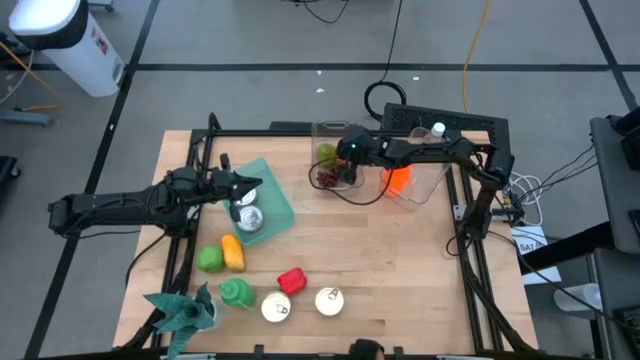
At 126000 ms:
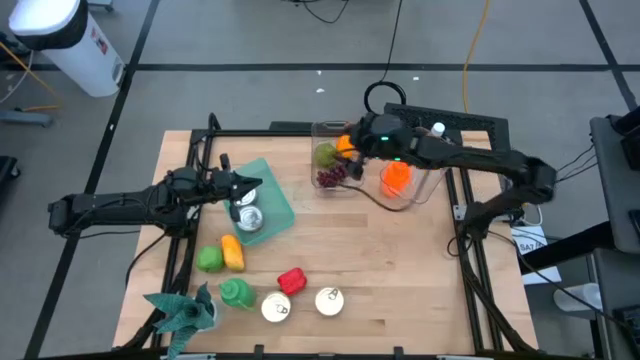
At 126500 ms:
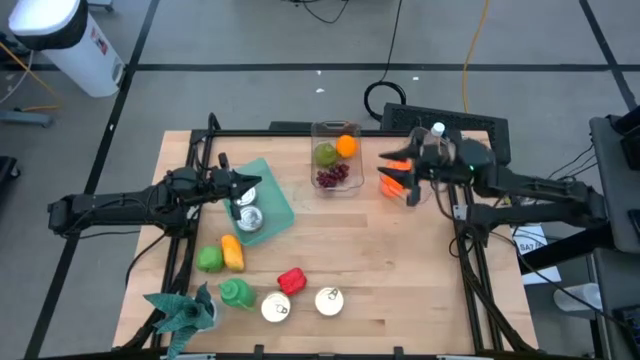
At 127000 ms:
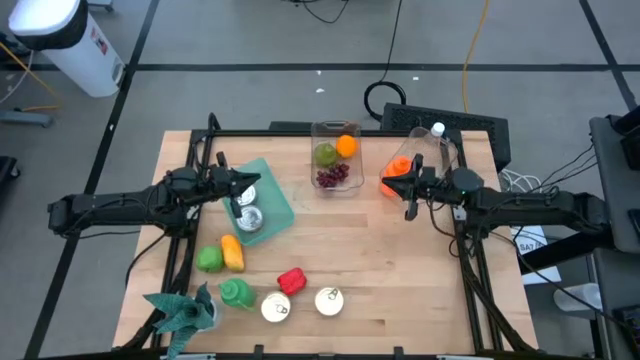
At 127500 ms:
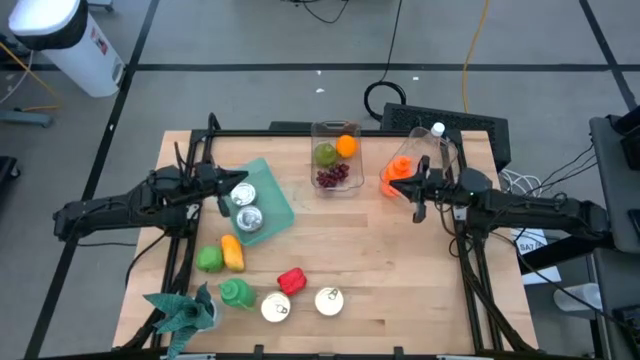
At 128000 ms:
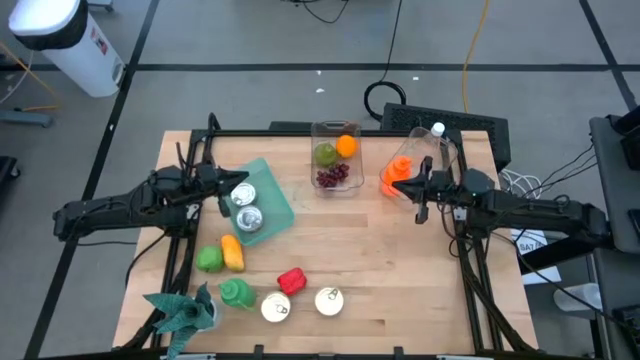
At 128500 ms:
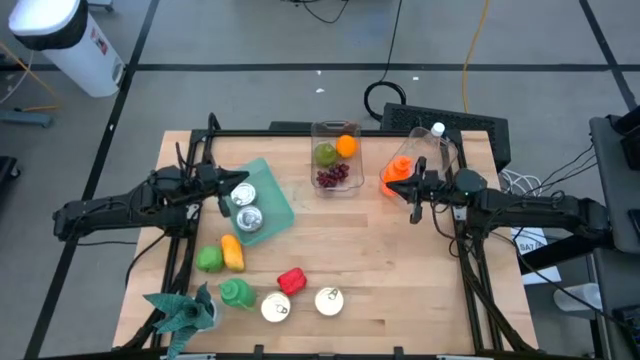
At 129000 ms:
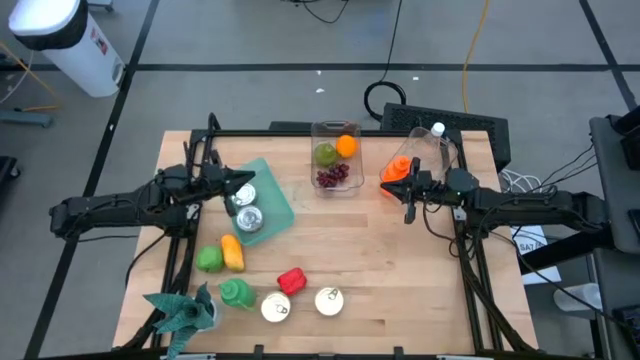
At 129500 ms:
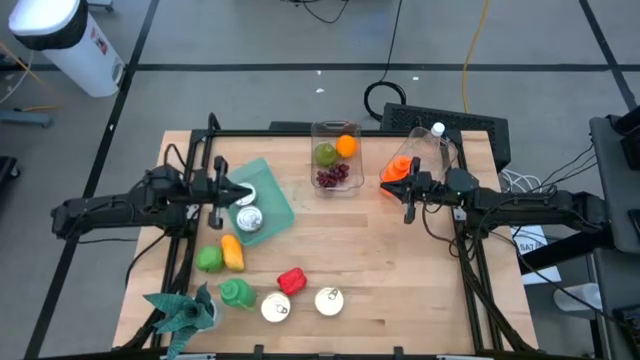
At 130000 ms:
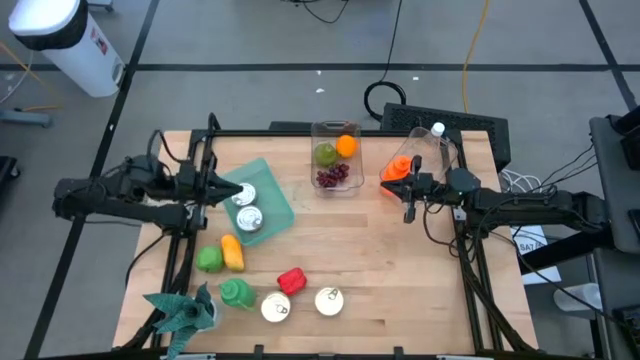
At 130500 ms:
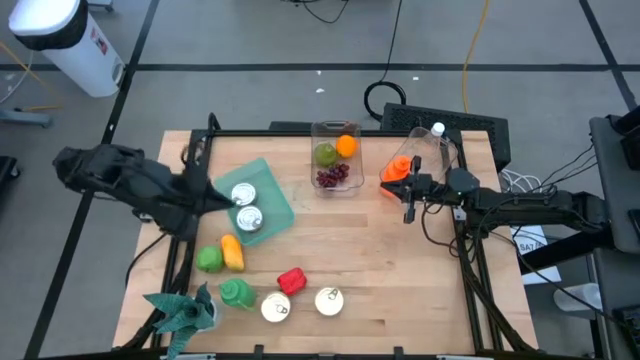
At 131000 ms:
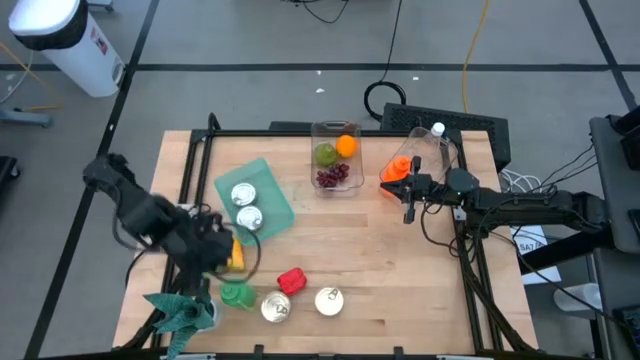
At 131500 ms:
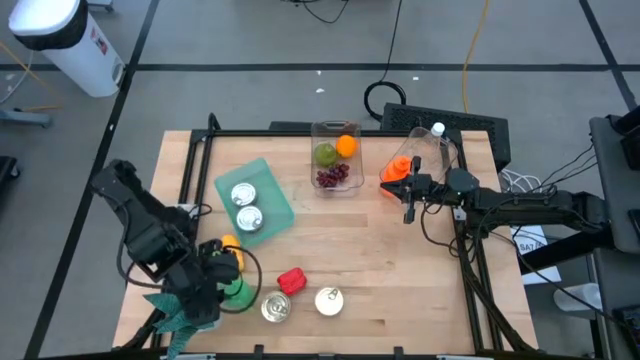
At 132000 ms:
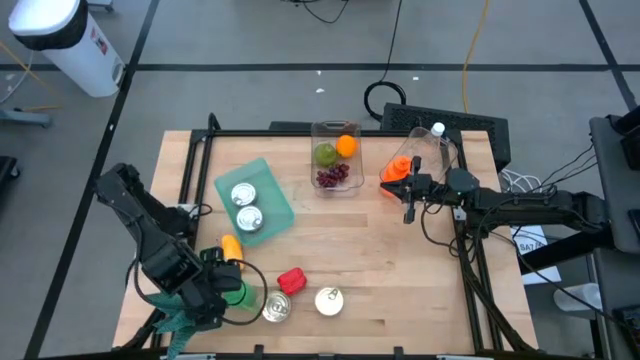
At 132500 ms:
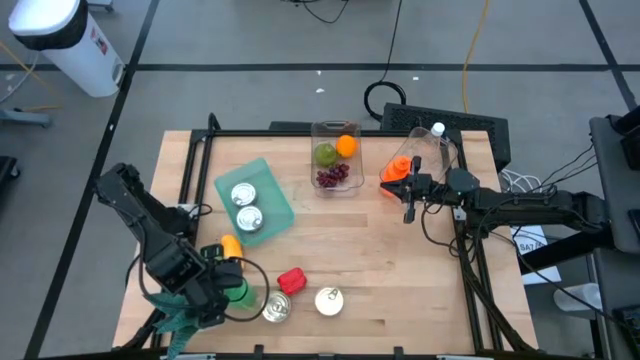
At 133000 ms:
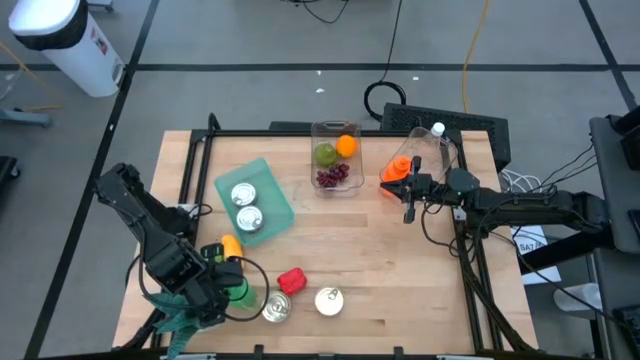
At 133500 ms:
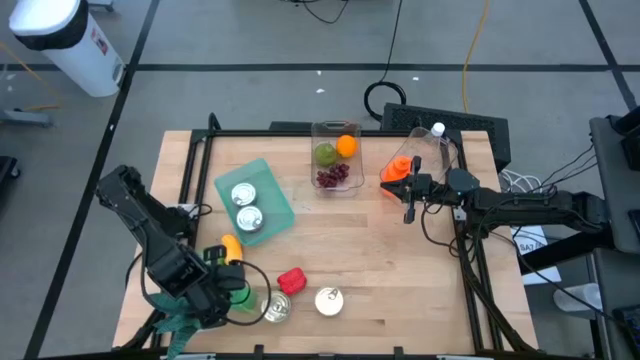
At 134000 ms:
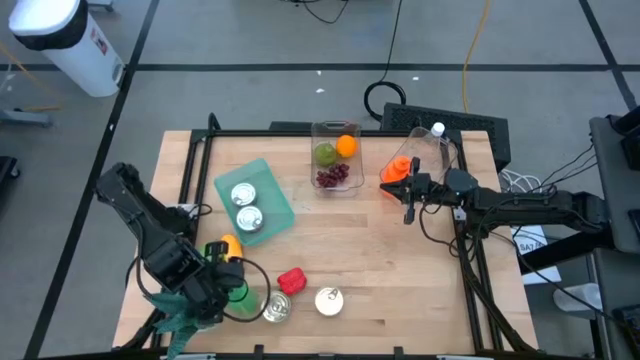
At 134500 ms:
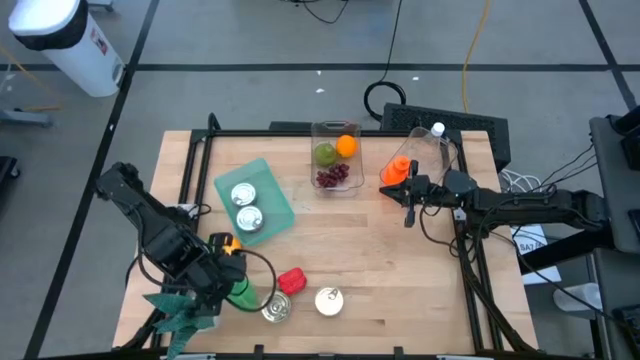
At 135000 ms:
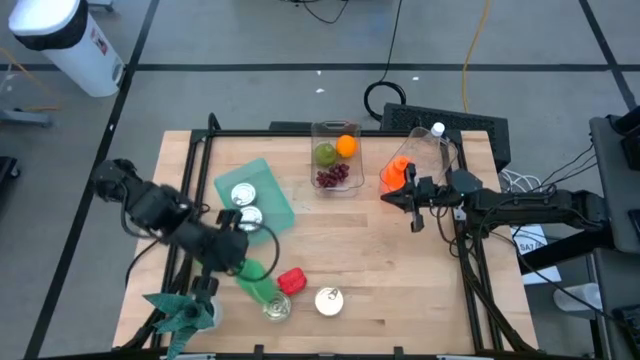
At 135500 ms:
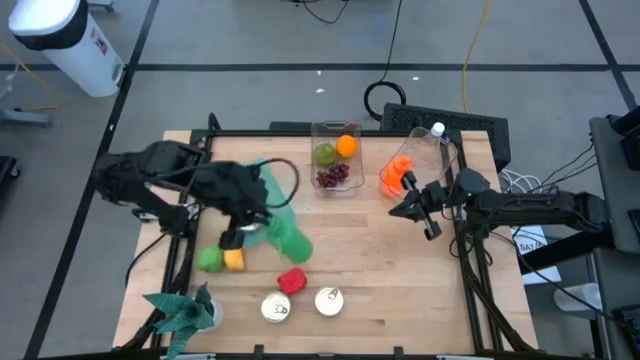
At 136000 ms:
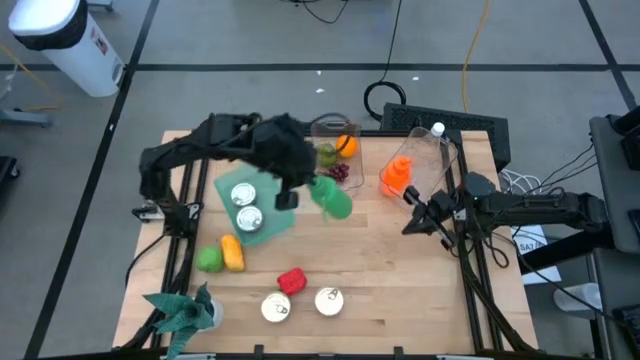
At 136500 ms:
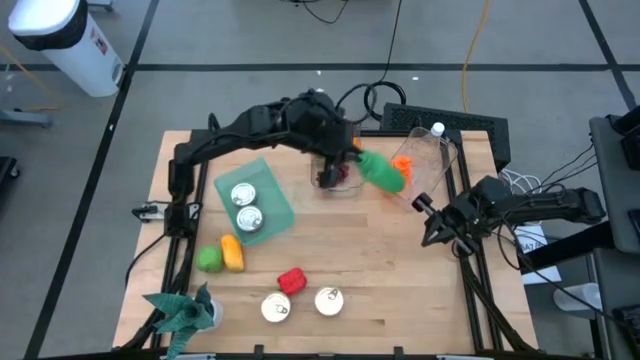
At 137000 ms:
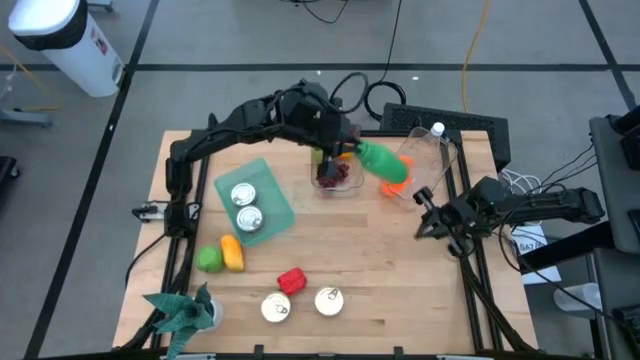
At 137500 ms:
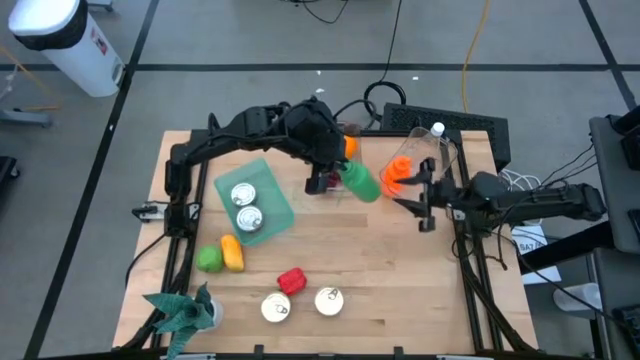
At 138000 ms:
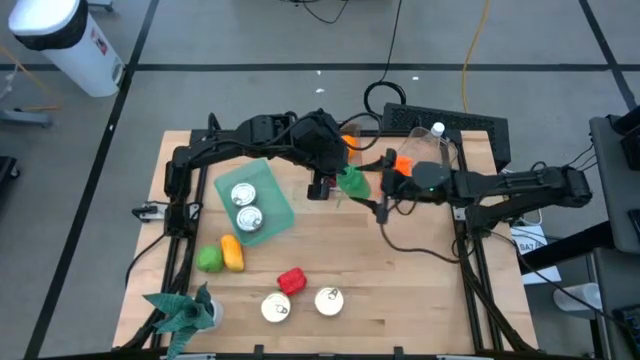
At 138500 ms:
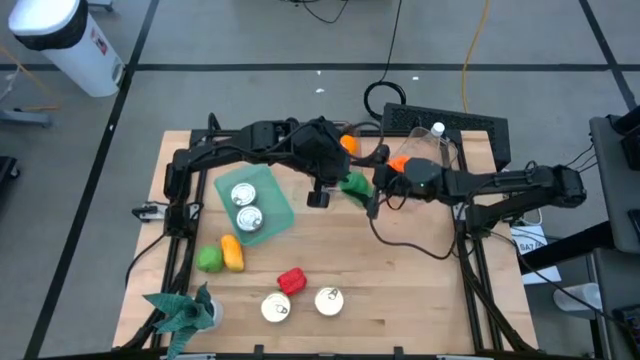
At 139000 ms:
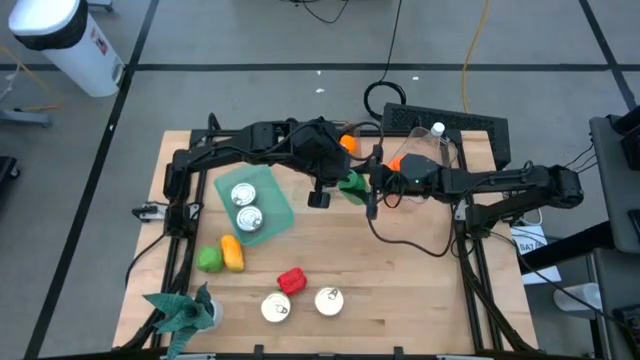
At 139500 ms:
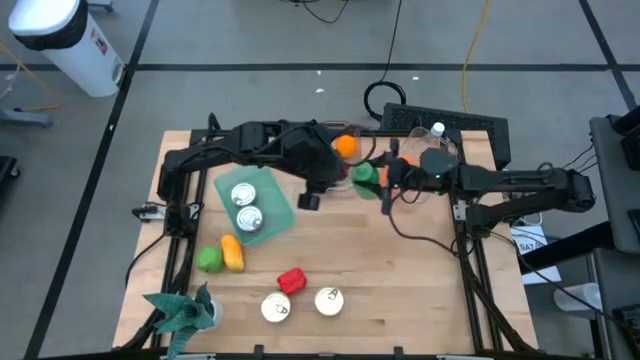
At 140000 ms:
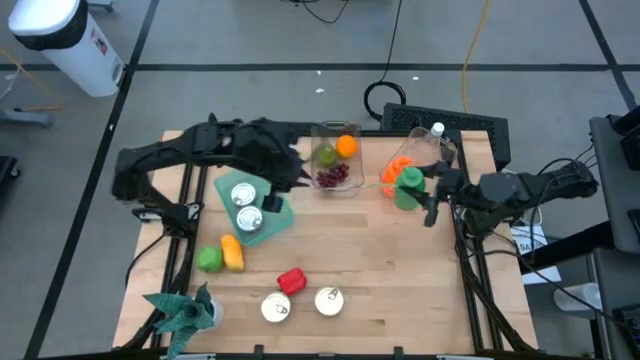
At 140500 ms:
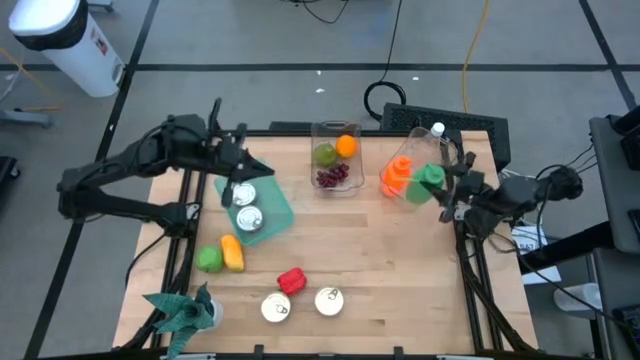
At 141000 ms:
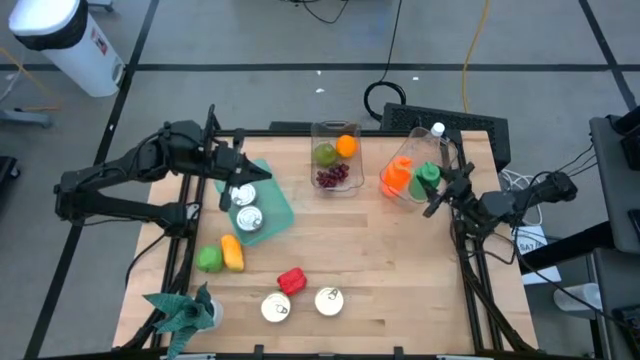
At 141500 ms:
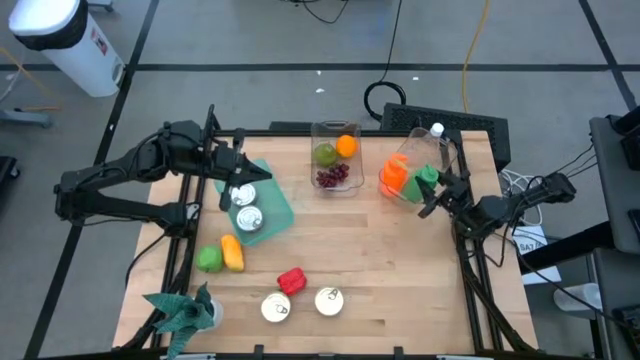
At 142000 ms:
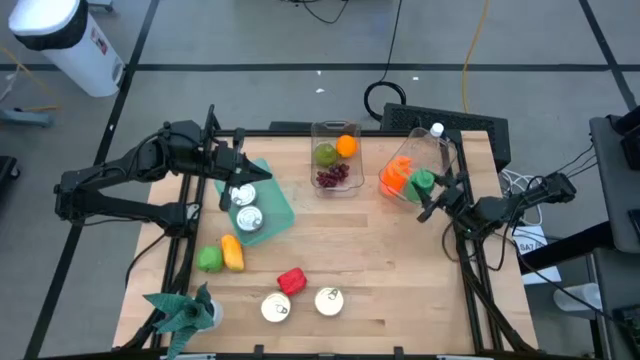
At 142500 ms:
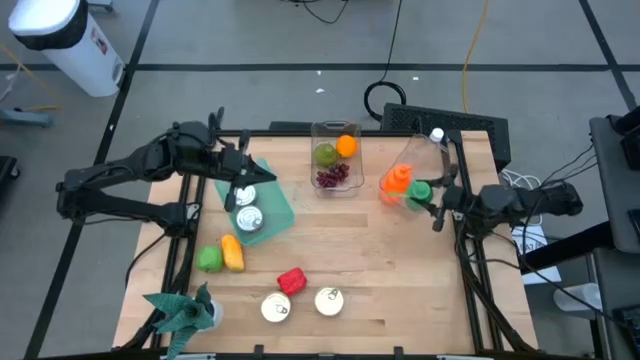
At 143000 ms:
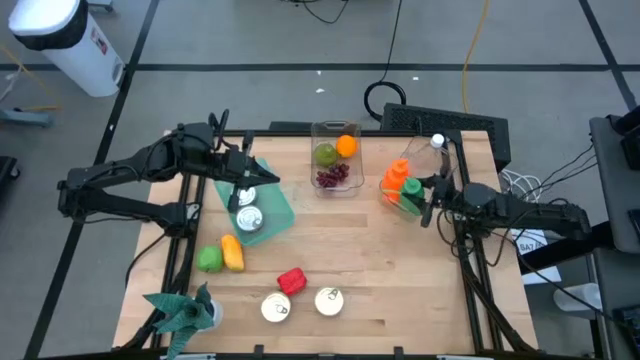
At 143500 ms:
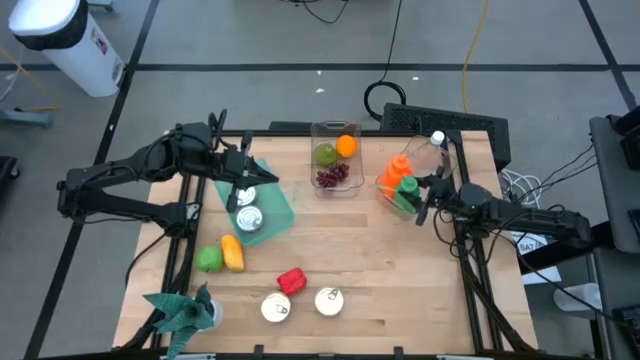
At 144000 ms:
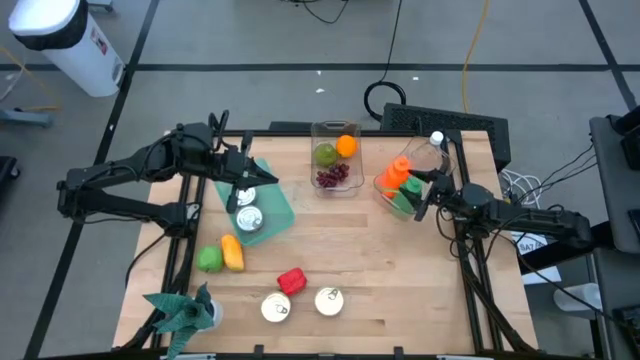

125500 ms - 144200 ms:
Task: Pick & Place Food Item
Put the green water bottle into the right transparent bin
